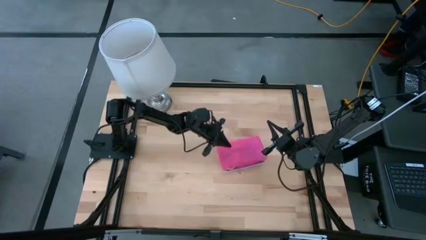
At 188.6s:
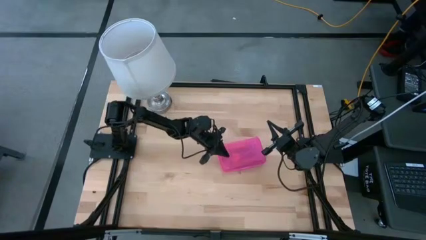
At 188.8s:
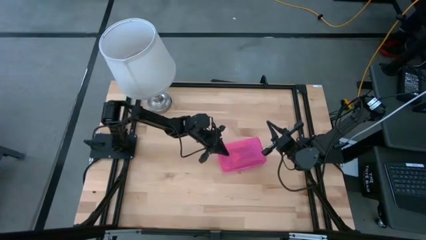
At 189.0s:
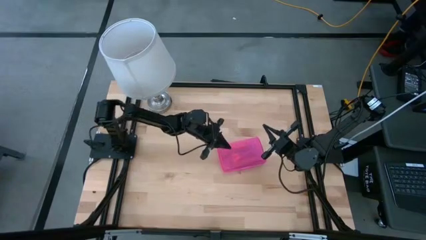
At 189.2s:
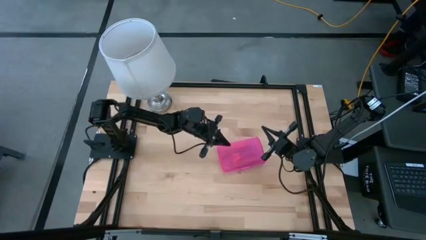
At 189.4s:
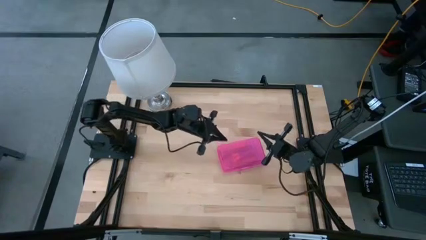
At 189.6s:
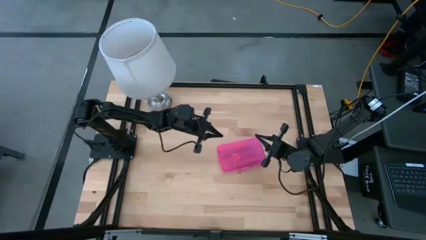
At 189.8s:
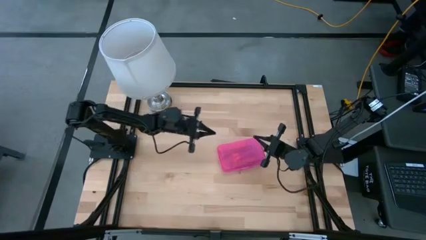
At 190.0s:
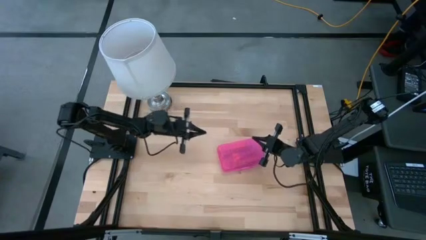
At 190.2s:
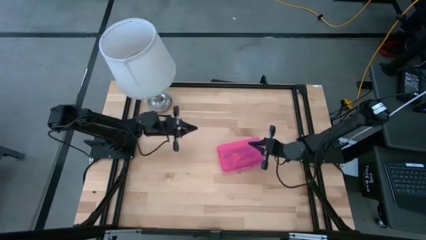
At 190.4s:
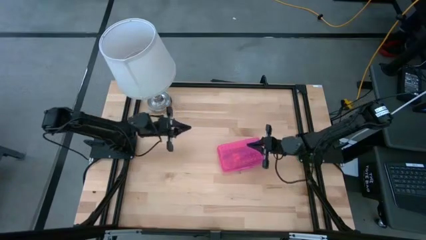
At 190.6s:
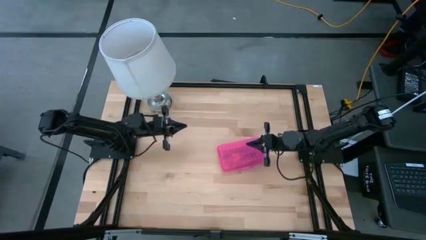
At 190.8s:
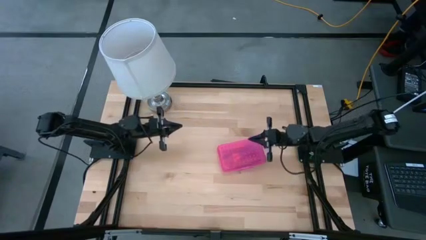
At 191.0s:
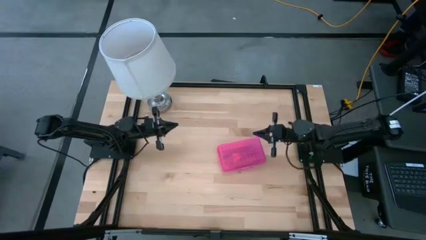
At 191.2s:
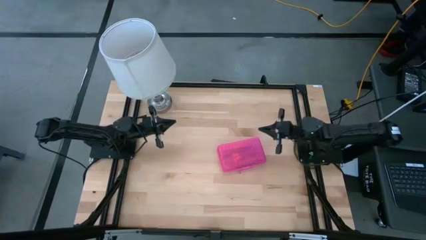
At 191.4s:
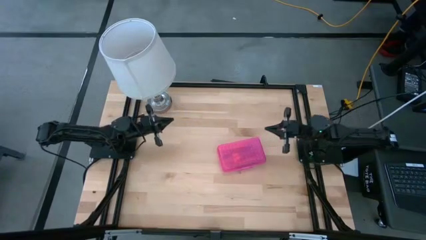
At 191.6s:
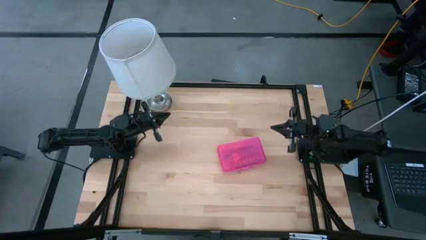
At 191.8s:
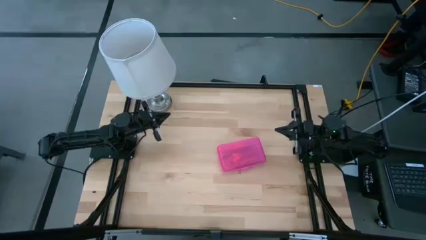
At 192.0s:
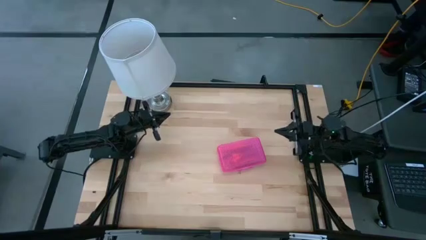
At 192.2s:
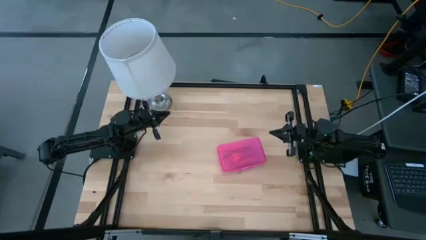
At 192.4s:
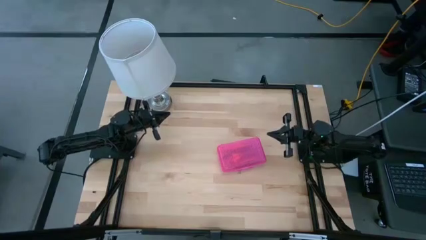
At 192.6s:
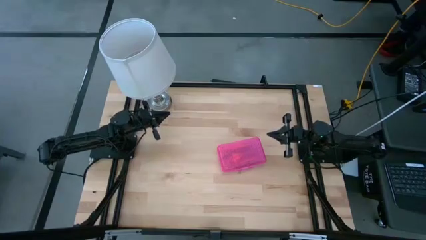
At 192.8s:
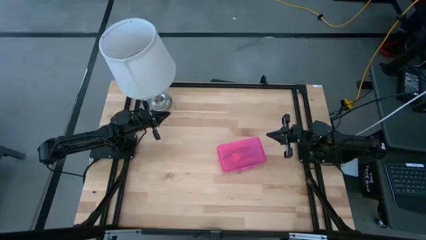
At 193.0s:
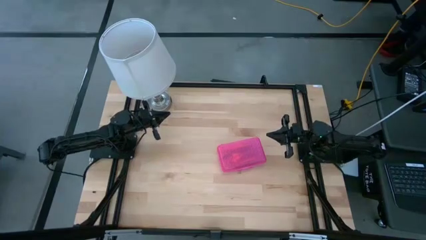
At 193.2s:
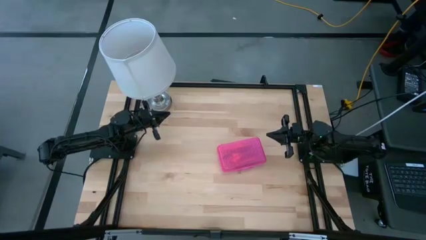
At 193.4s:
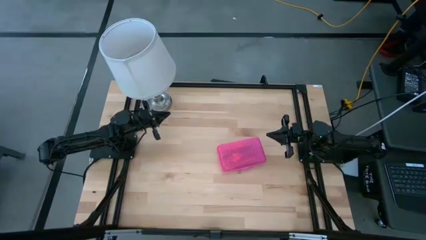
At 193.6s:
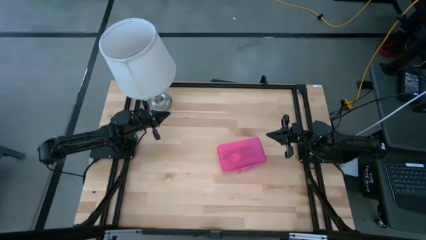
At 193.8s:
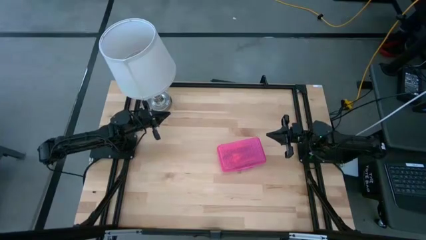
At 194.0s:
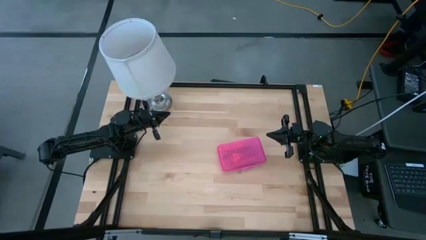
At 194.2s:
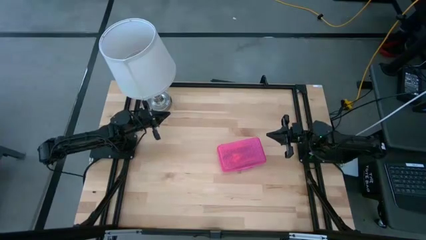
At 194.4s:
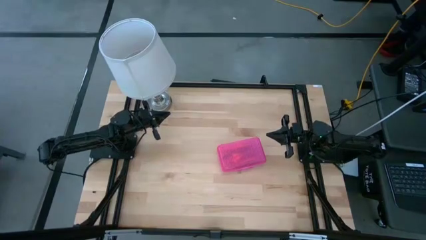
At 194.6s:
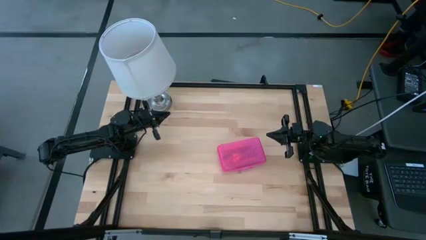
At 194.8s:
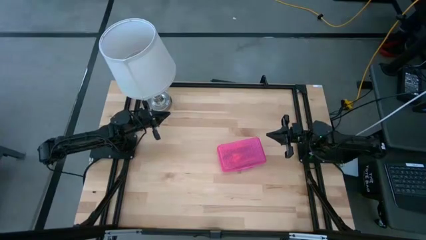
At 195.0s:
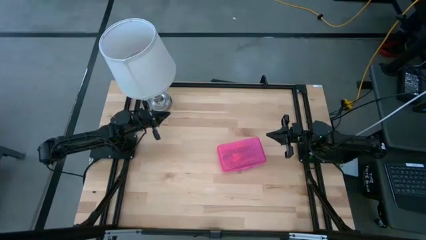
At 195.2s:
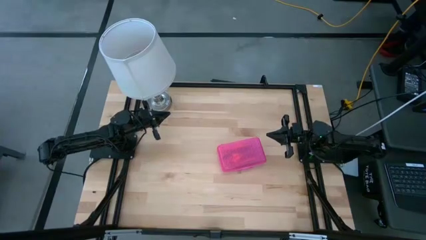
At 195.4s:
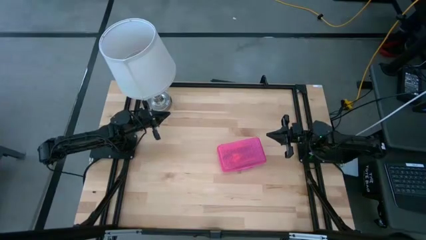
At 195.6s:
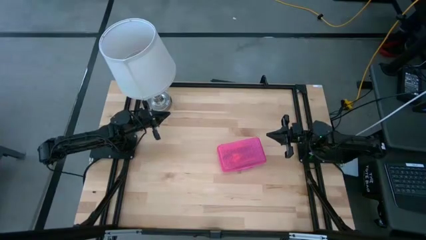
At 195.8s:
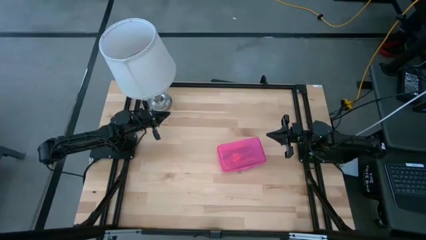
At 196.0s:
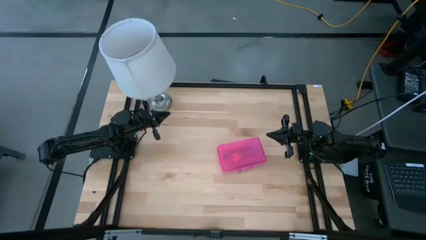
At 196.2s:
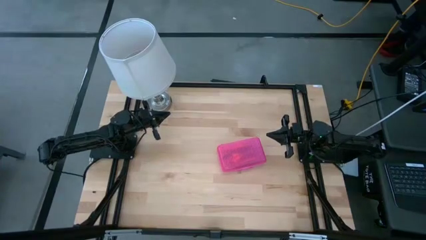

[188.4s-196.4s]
Task: Pick & place school supplies into a supply box
Return to Home Position

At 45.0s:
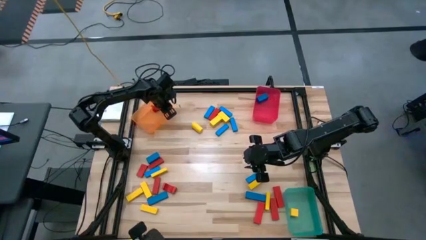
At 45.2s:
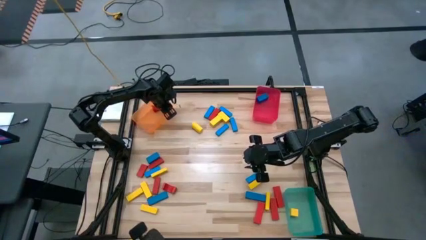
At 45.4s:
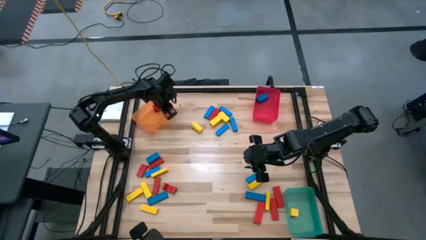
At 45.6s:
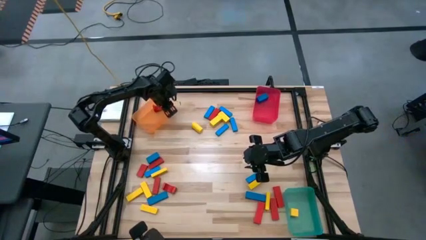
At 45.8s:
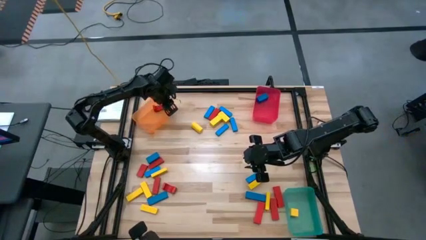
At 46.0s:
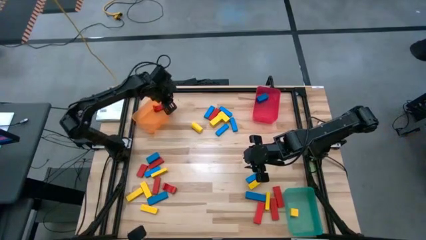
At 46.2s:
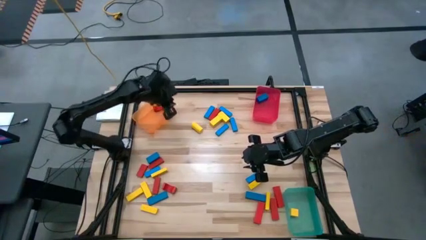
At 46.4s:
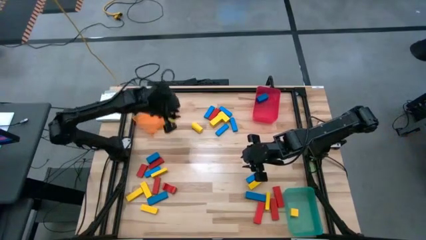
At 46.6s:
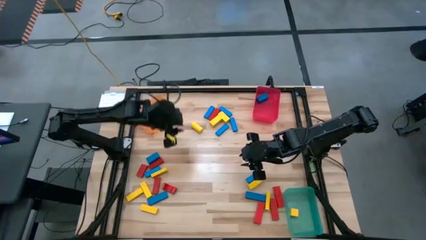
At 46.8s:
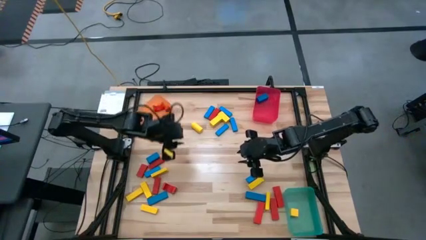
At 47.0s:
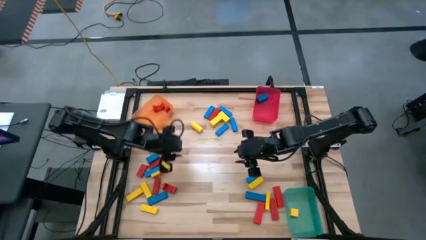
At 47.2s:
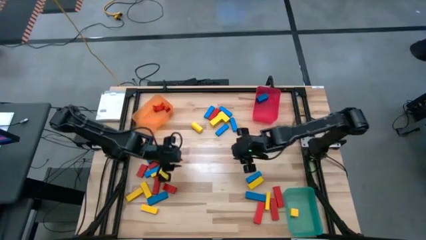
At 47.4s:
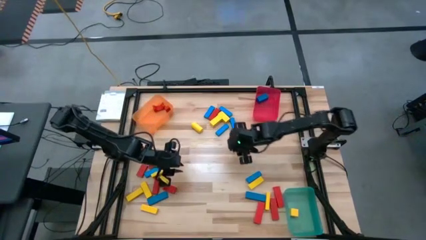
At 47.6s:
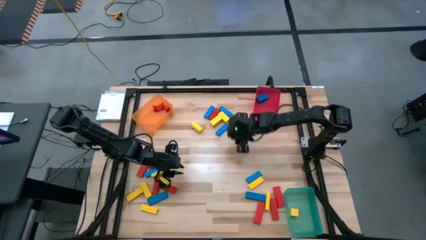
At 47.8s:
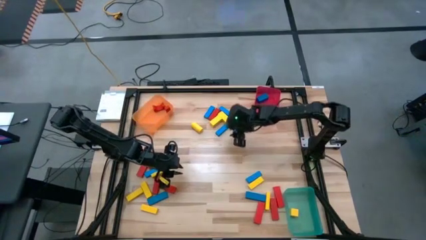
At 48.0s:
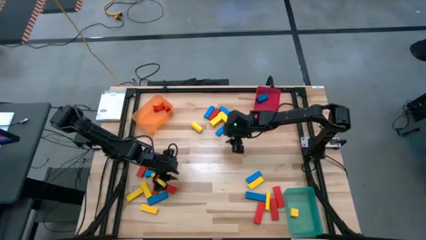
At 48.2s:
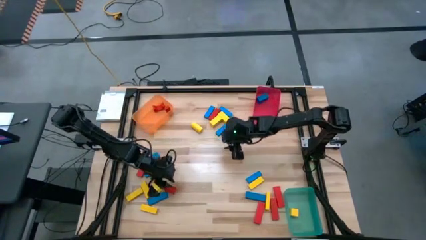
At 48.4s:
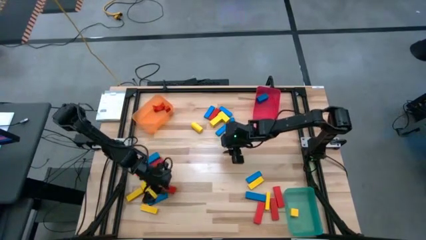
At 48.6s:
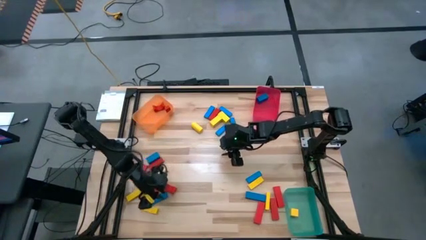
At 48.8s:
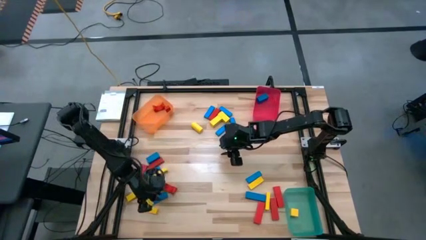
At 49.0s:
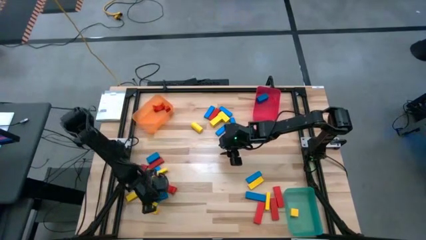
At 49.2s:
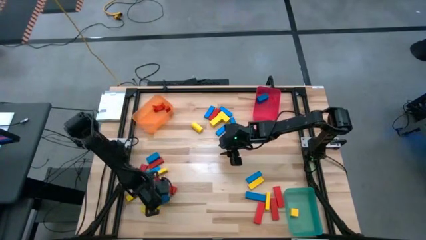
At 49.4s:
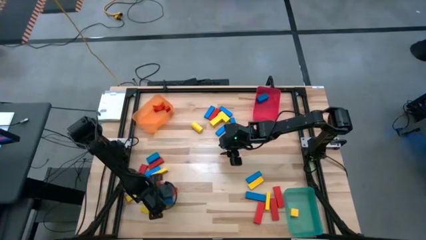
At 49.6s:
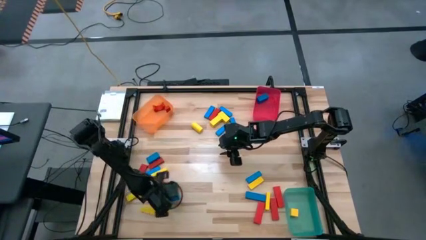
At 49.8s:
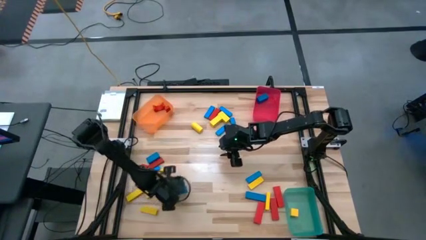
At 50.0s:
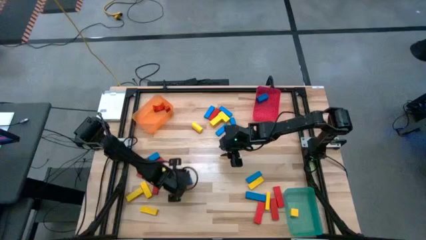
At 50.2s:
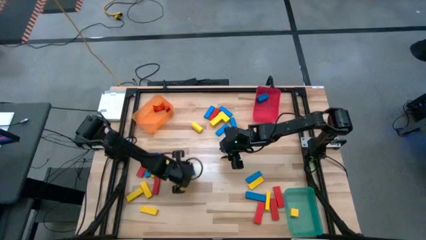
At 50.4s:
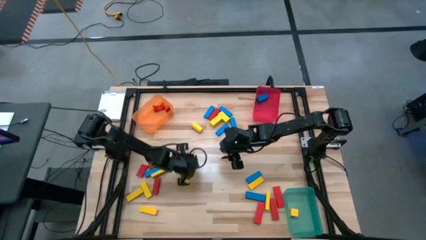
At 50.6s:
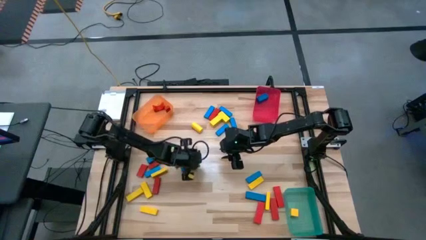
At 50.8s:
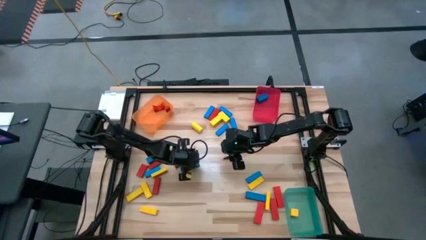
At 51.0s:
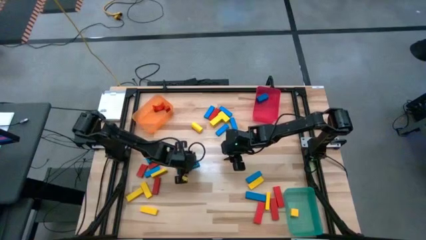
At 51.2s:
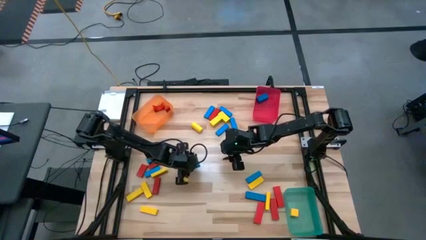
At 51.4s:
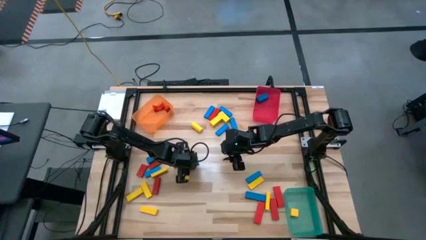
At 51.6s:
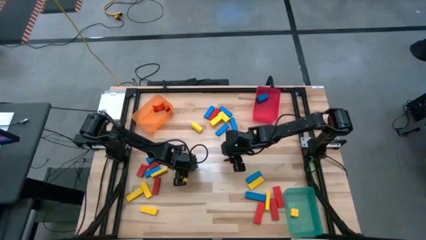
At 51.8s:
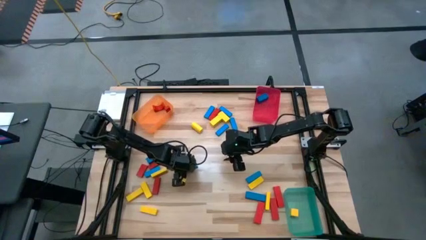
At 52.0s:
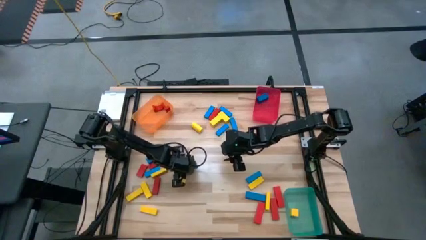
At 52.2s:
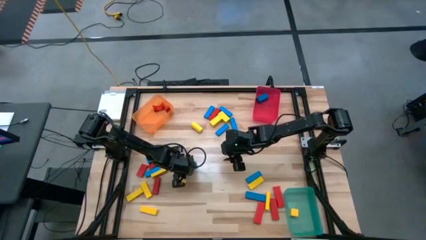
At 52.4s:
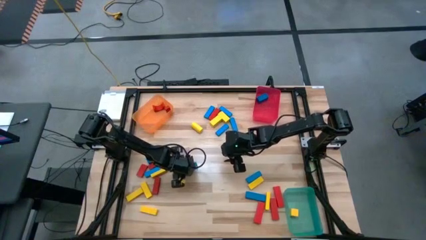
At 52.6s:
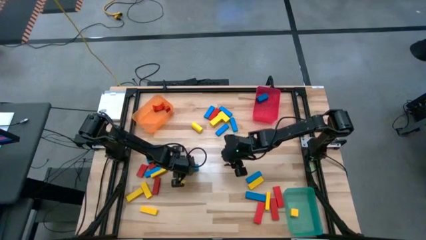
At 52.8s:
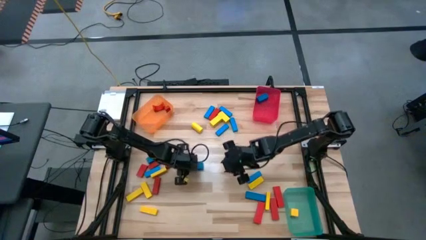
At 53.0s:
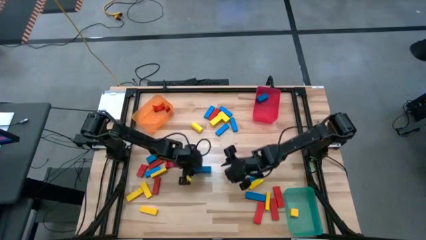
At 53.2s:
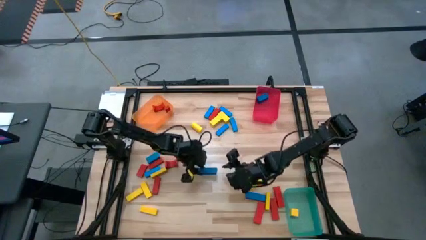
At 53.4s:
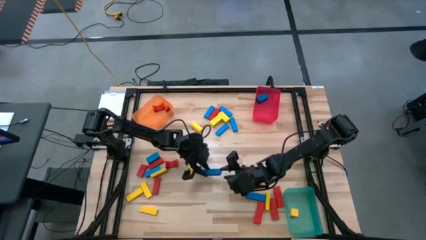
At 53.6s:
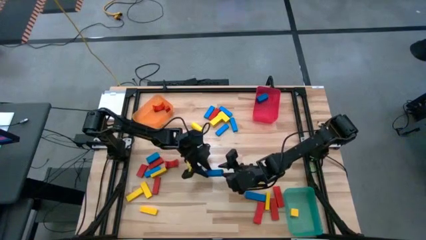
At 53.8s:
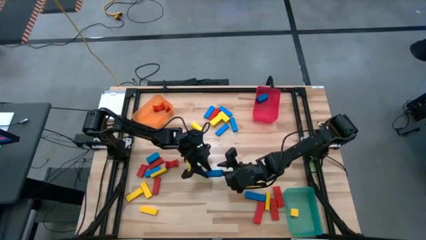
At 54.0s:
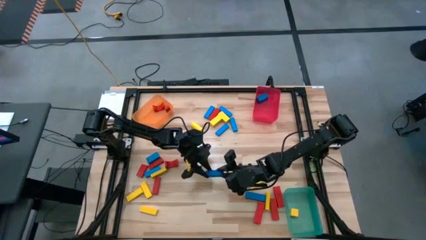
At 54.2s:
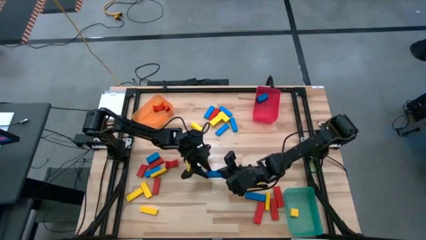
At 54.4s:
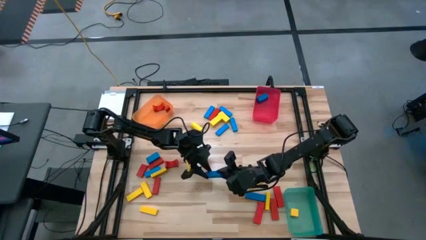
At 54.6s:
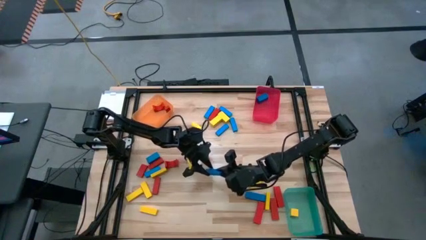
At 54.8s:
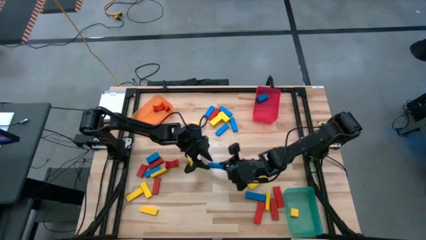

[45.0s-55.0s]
Task: Sort blocks
Put the blue block into the red bin
